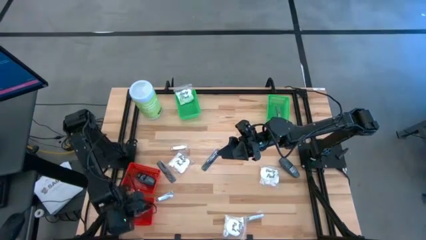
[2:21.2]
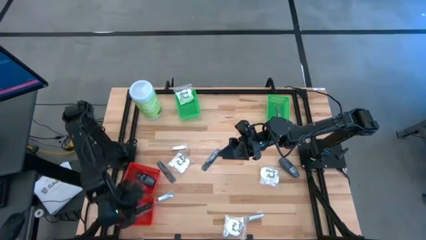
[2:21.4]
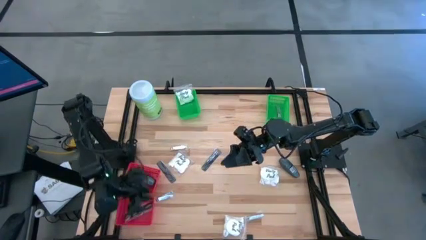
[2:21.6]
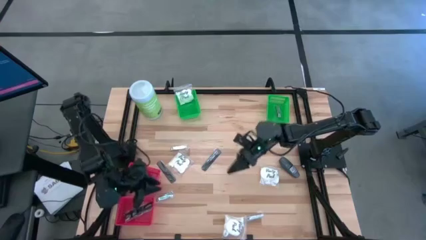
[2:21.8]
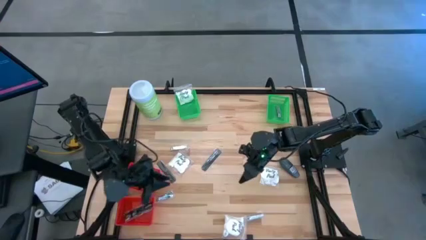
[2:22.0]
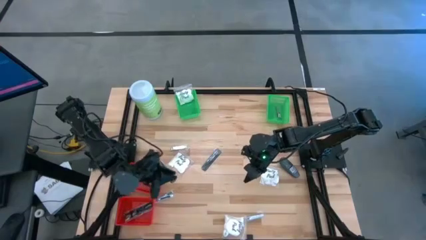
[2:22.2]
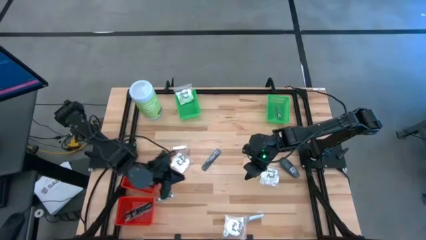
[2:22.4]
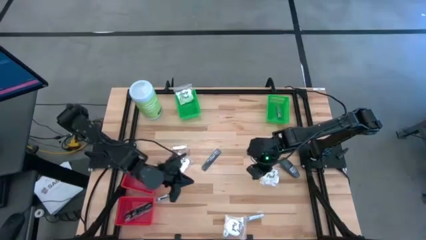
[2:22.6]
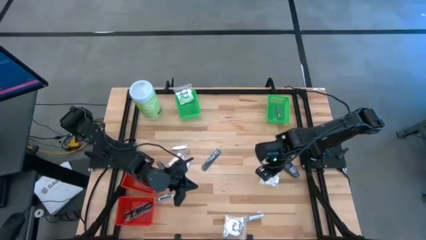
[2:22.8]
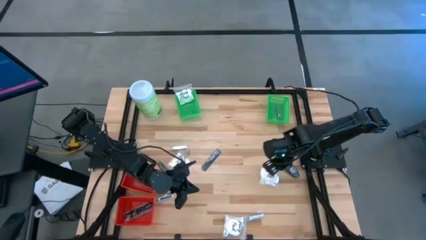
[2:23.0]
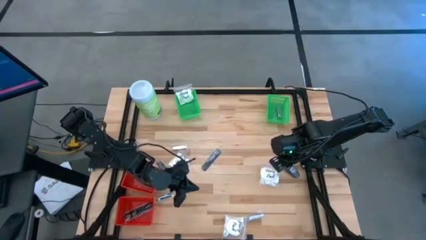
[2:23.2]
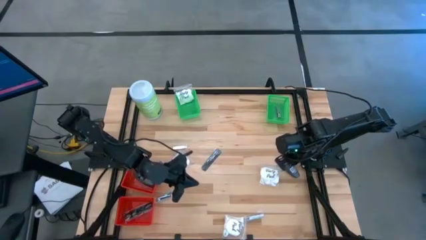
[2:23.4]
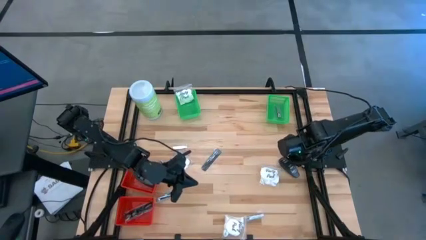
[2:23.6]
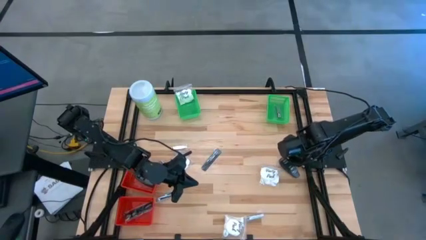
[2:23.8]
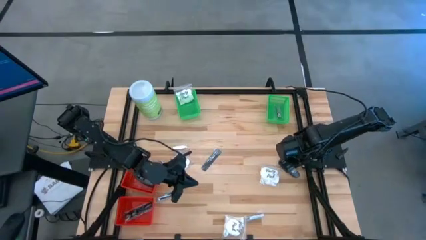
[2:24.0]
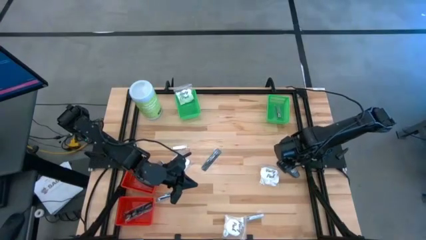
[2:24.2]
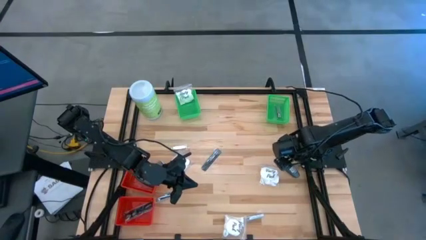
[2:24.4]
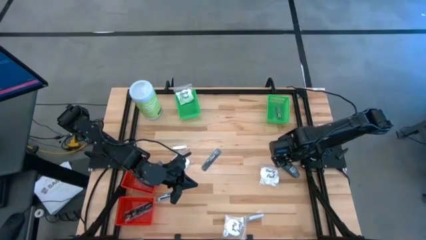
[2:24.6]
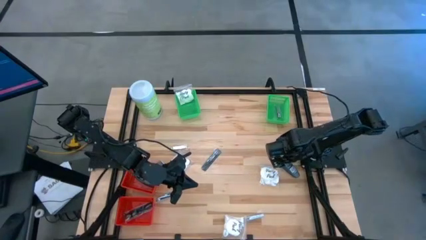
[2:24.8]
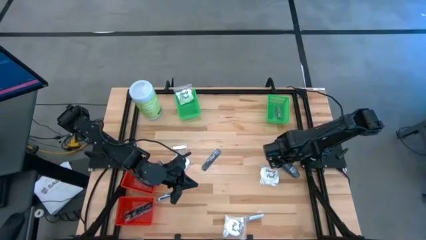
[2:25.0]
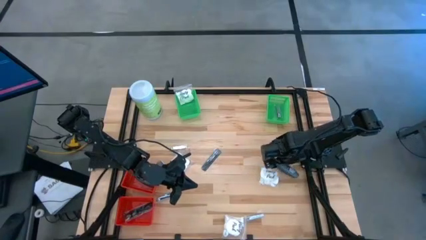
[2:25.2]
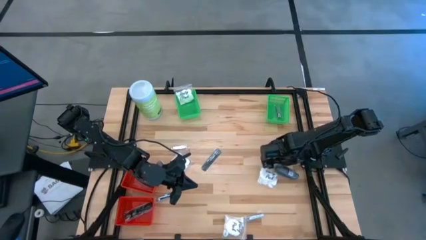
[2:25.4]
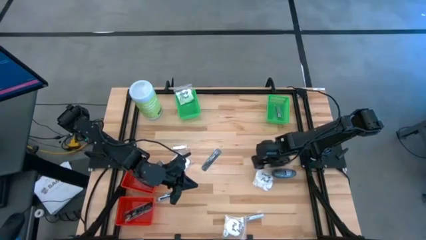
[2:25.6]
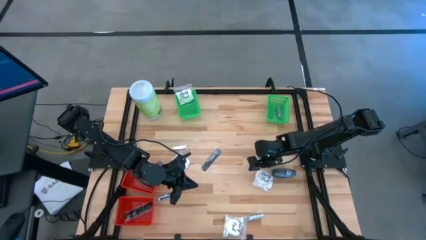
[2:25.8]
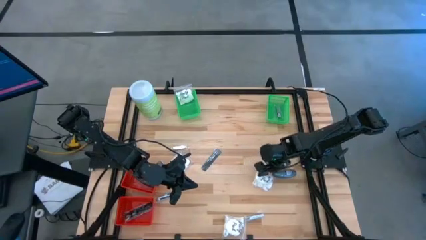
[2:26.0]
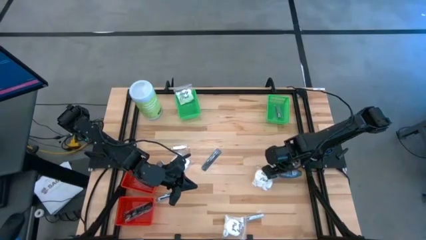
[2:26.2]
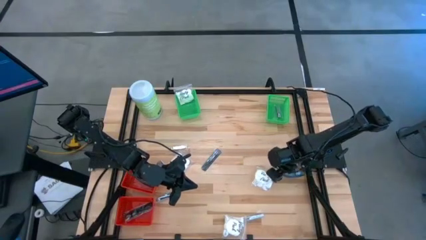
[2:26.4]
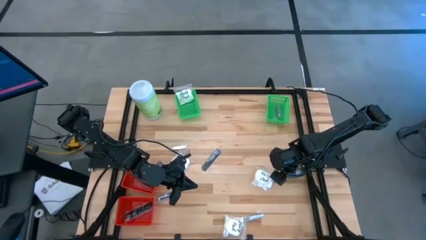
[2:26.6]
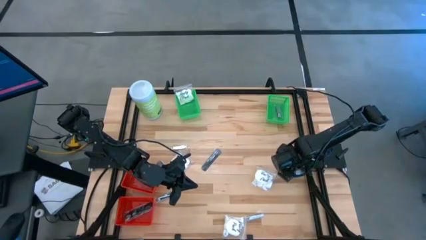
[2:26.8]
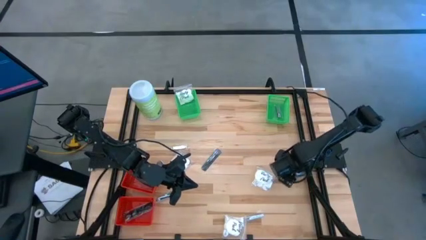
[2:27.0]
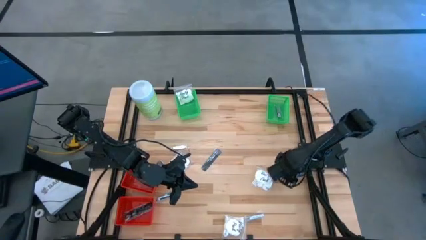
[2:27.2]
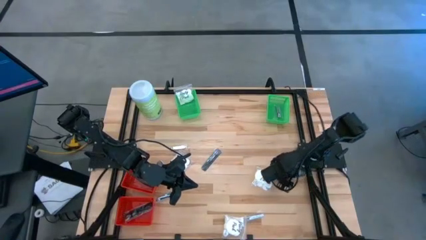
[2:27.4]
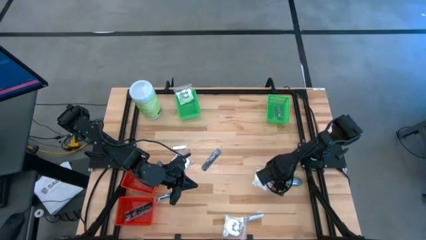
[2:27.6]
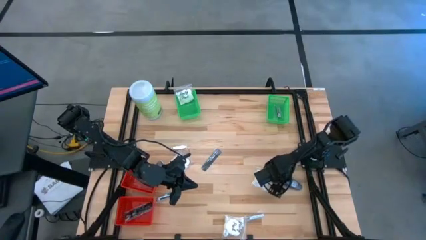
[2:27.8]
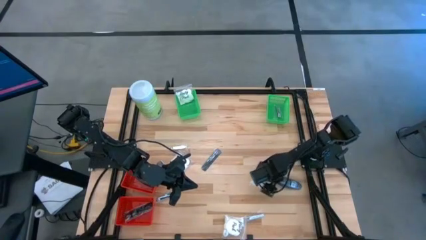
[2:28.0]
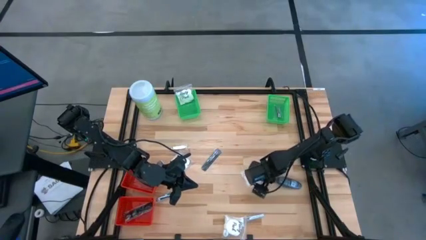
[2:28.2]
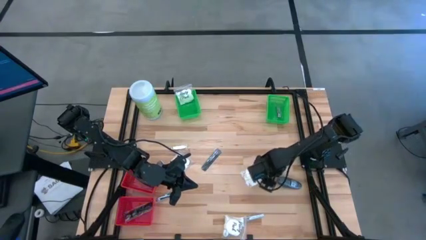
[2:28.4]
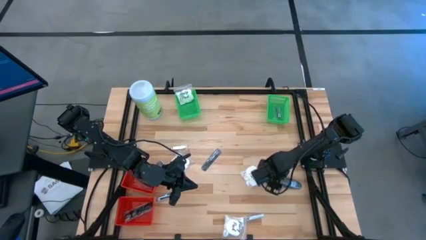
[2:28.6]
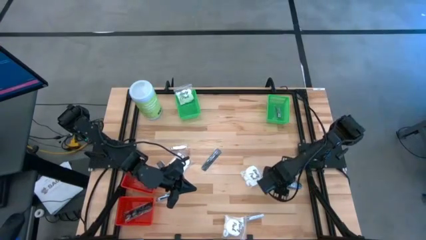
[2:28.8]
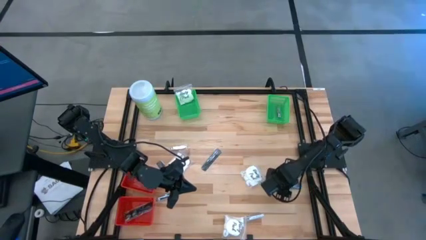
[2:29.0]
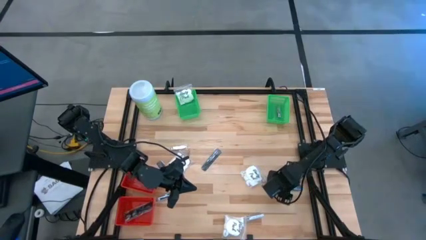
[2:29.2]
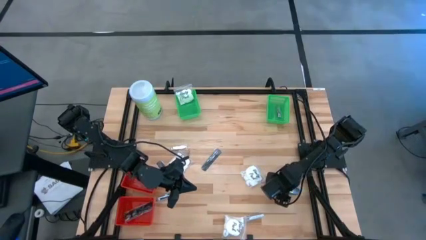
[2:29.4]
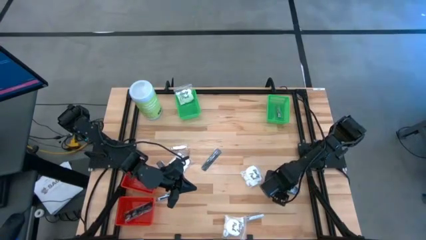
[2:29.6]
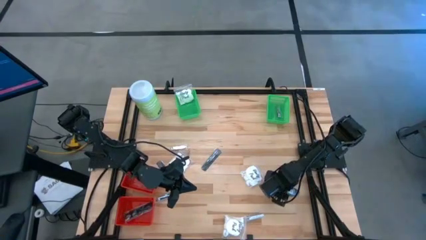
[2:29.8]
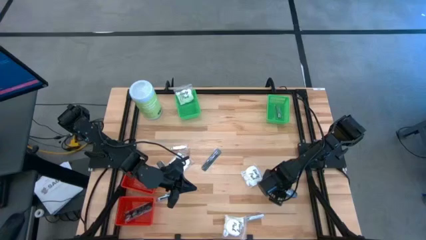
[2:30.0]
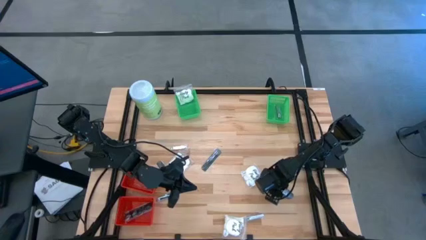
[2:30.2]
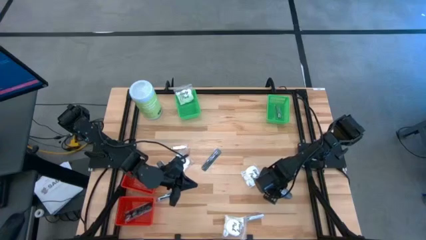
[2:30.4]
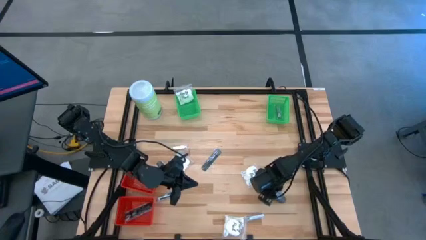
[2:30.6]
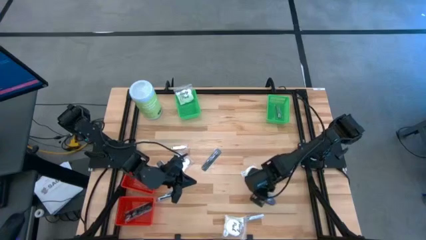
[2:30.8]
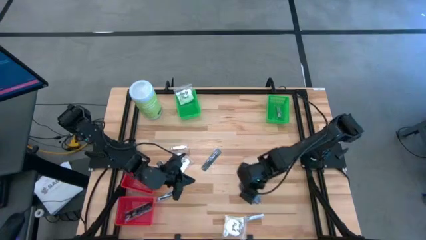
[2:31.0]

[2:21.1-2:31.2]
Task: Pick & Place Travel size toiletries
Put the black deodorant into the top red basket

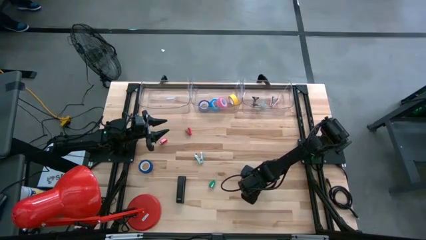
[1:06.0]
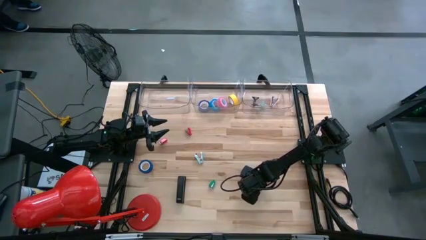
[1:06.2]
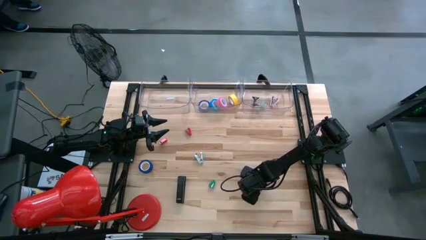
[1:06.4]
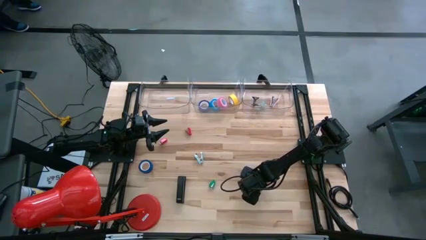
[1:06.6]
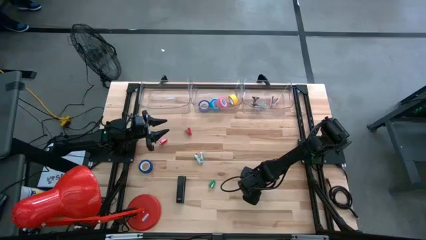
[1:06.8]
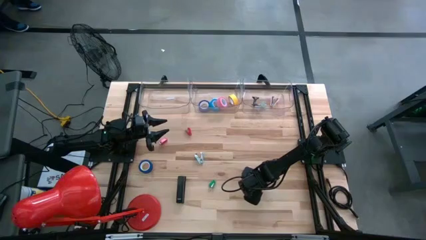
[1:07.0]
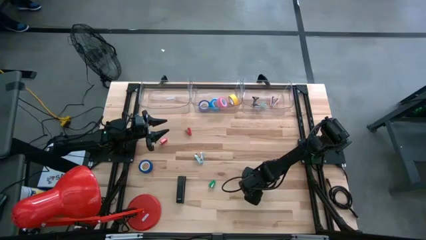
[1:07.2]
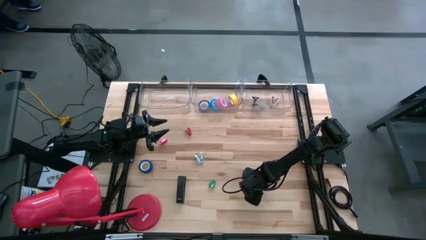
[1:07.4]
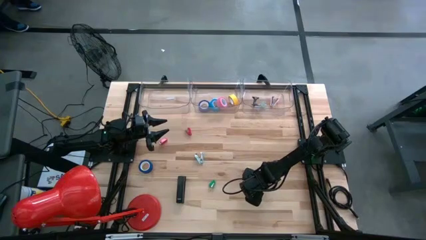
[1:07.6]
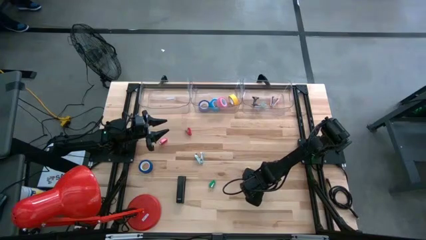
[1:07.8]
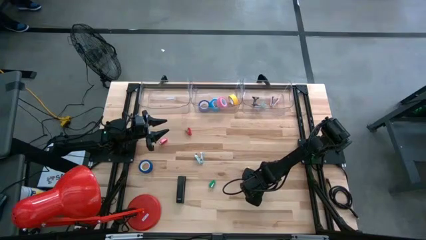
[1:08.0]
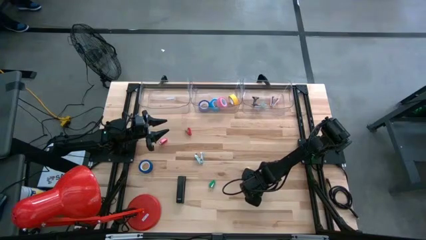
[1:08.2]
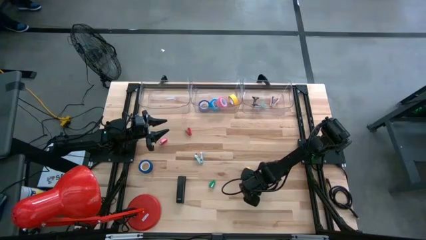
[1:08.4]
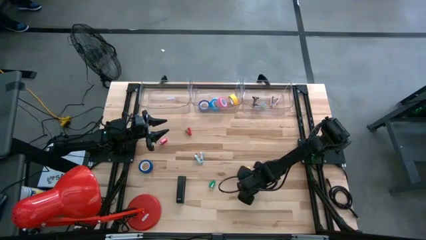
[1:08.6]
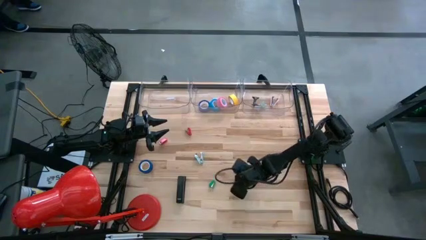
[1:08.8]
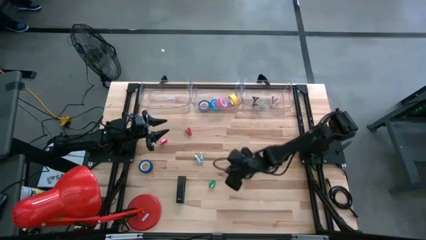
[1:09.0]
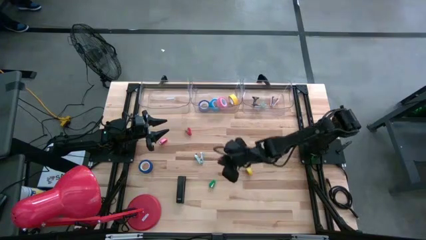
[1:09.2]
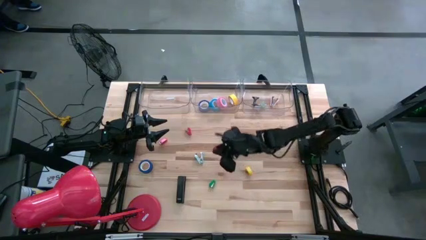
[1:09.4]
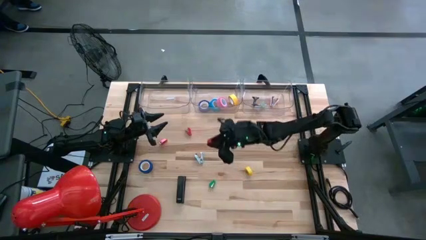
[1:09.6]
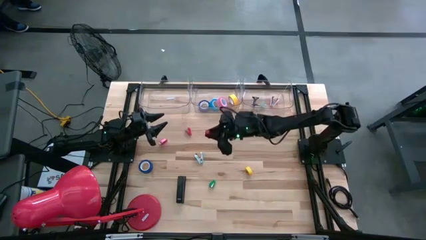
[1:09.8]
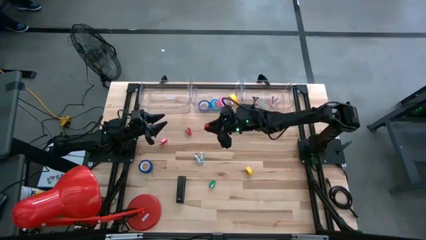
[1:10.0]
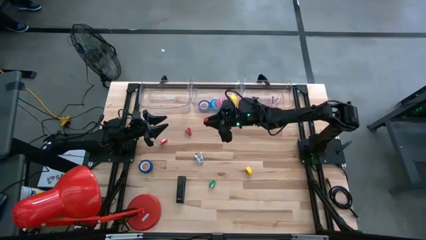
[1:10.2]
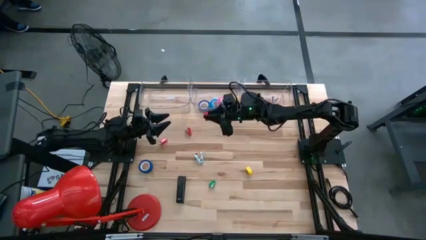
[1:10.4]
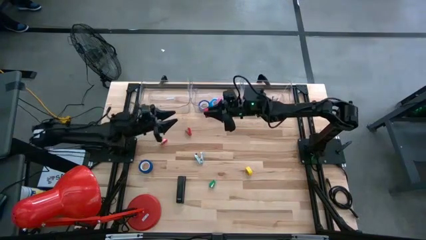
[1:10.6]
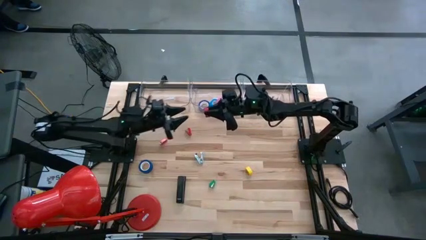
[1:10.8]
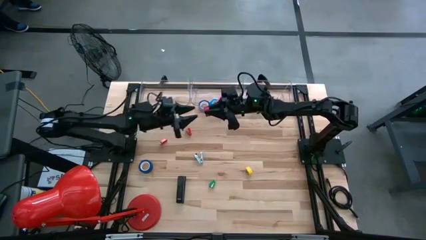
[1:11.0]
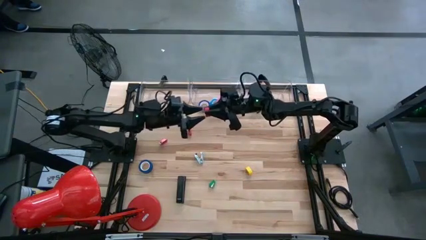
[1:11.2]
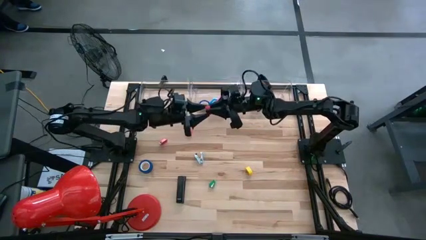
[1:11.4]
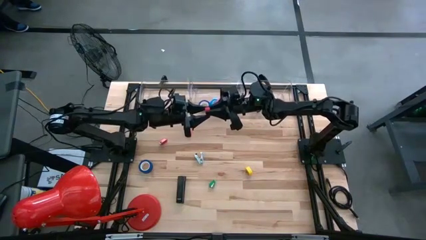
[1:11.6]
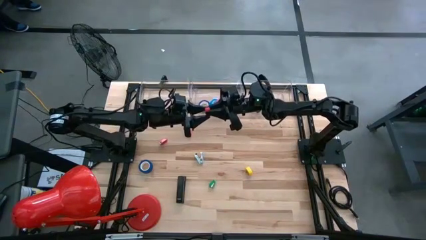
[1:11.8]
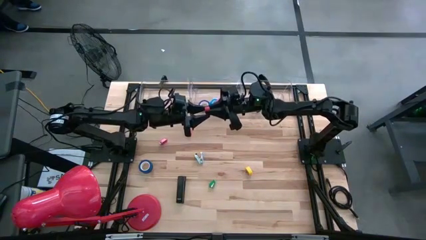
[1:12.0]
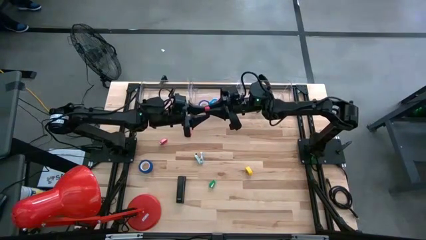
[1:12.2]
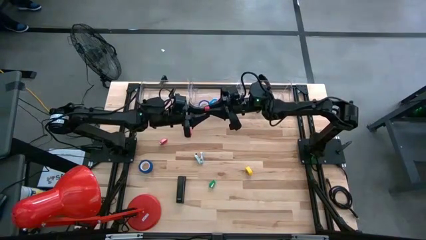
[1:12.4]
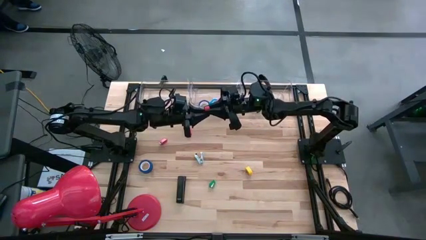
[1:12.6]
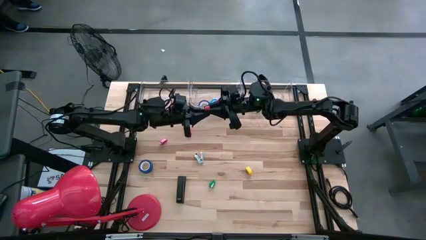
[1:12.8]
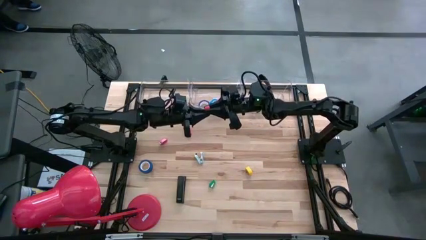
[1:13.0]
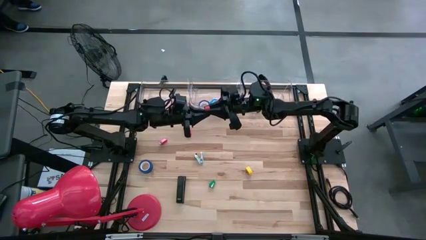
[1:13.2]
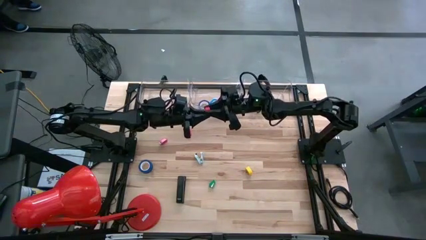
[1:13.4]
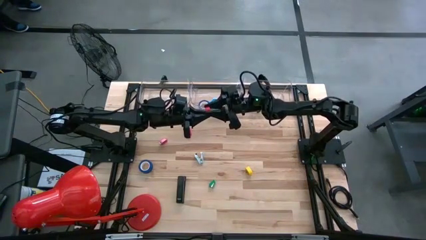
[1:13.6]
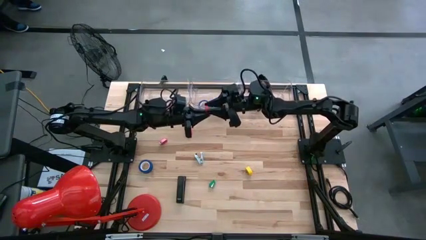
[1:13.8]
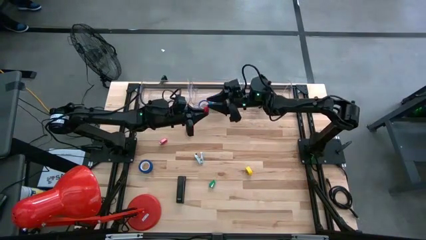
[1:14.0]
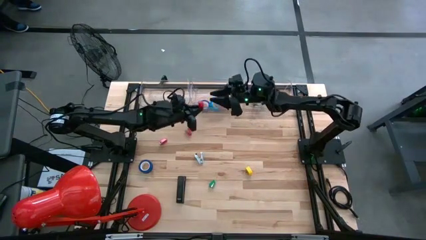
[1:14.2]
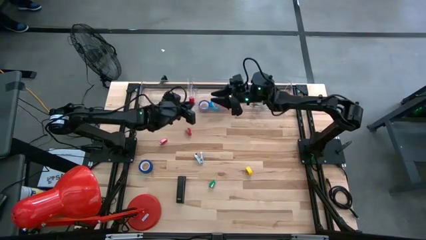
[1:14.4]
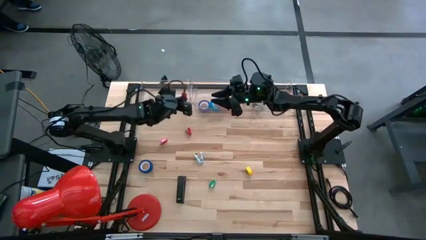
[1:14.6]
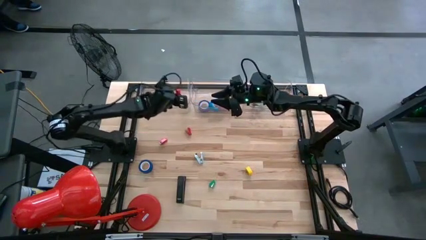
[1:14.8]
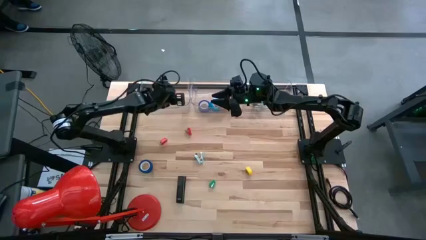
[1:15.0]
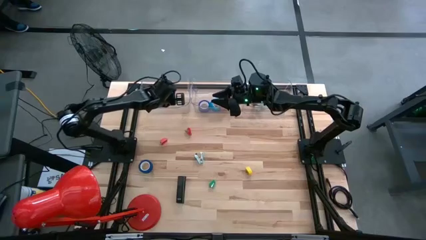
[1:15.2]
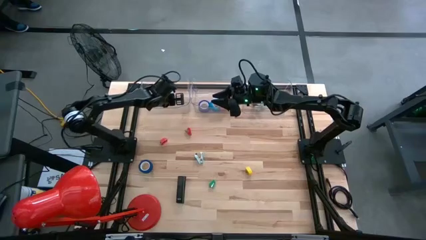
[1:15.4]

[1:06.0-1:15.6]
Task: Pick and place Stapler, Stapler remover, tape
Put the bottom right red stapler into the left transparent bin
